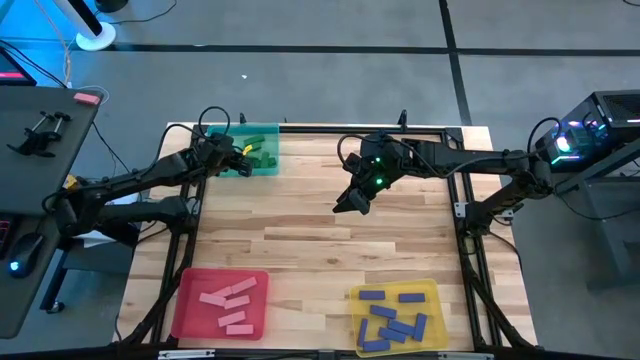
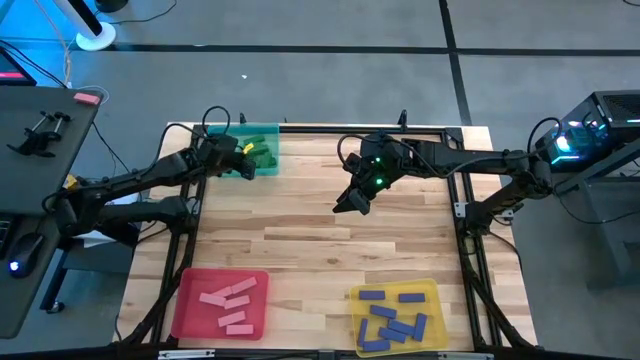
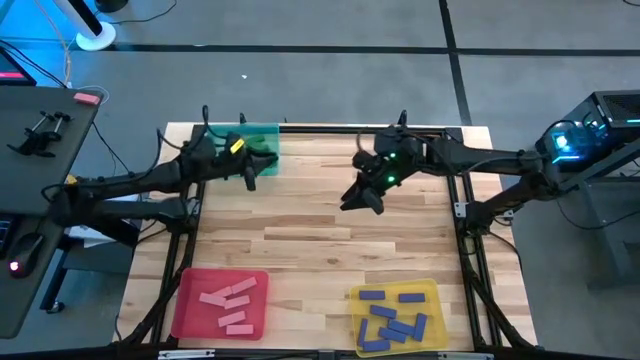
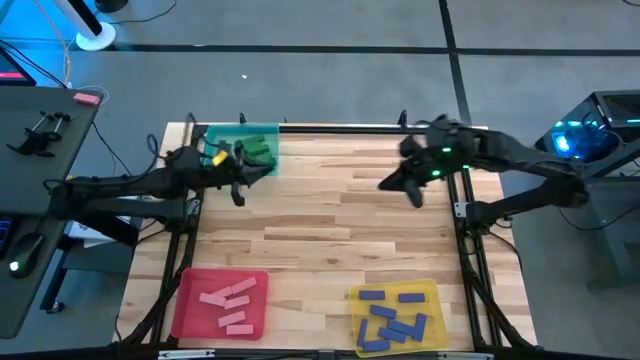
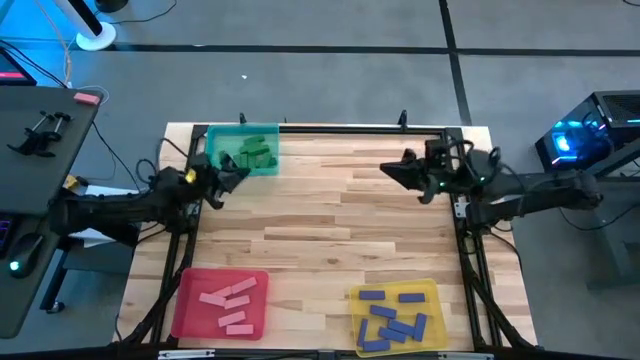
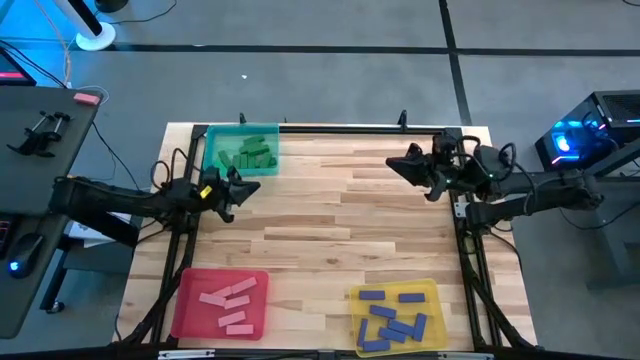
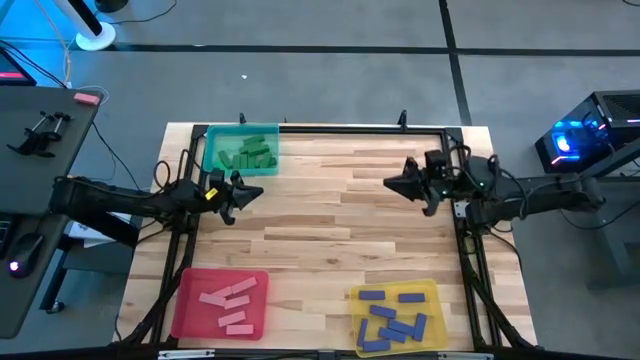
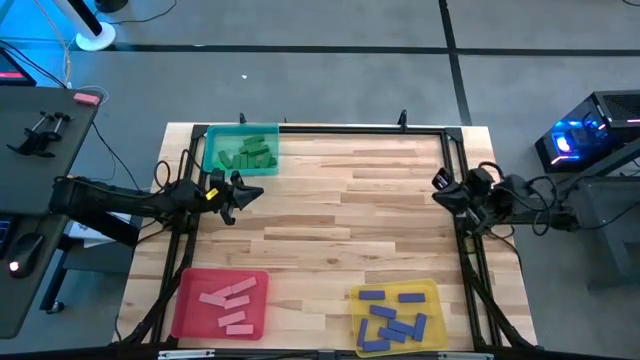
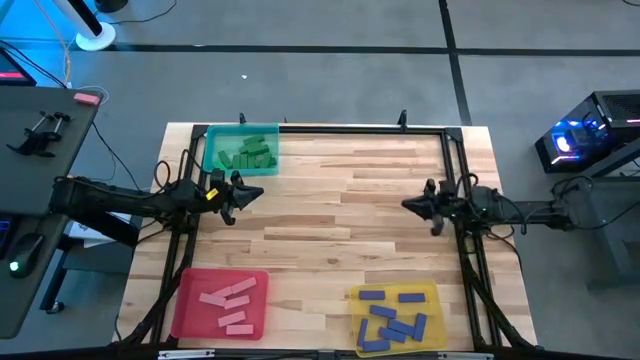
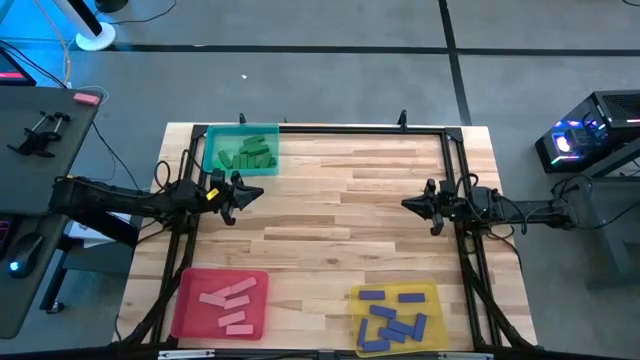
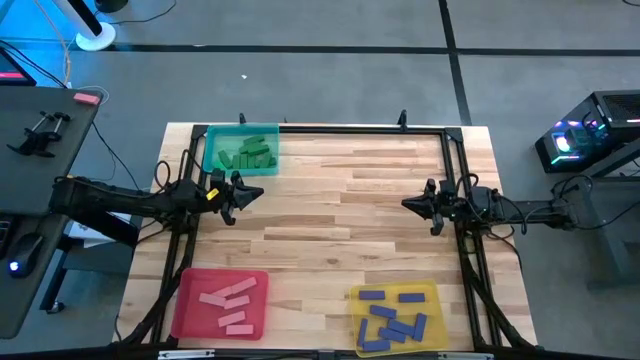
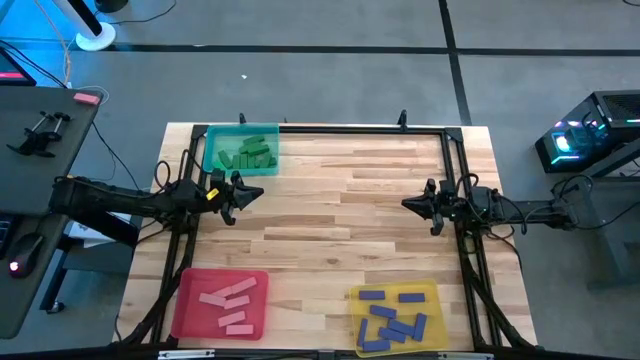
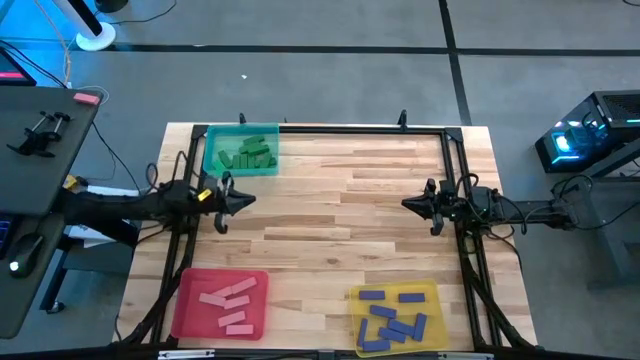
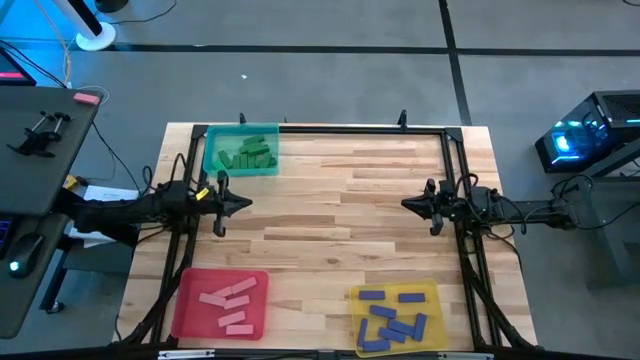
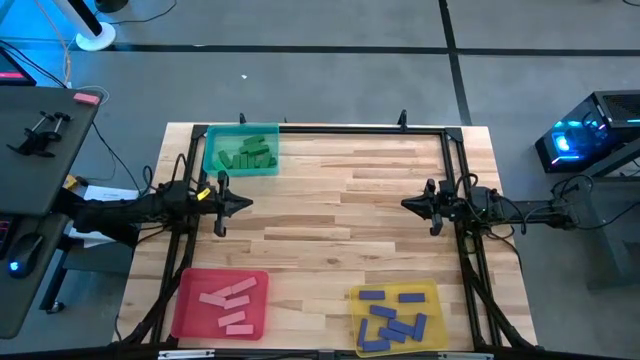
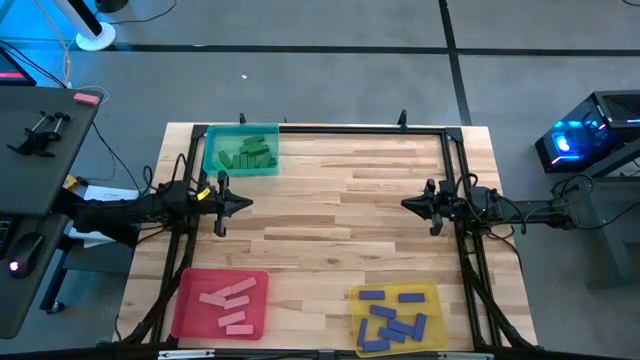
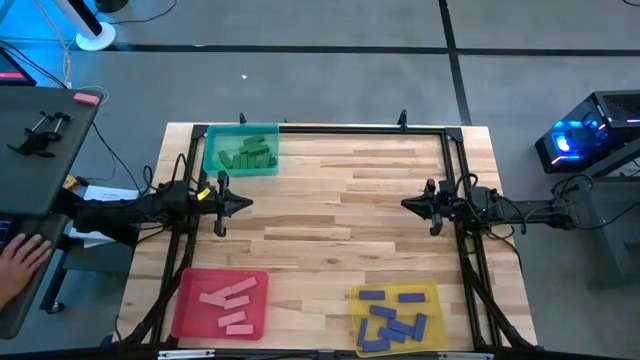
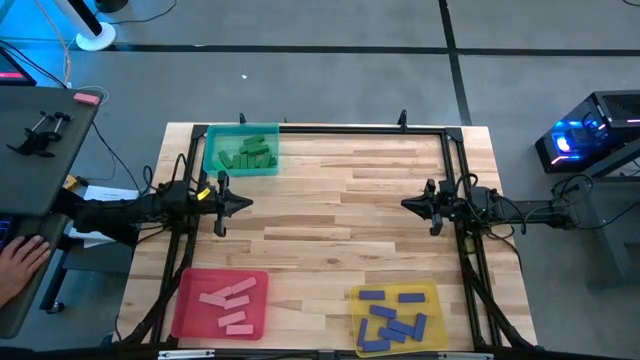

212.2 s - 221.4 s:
Task: Sort blocks
Return to Home Position

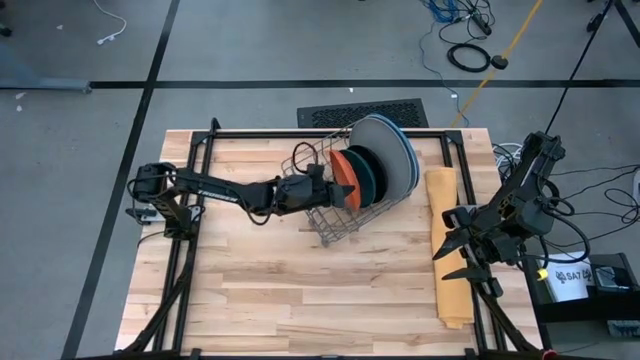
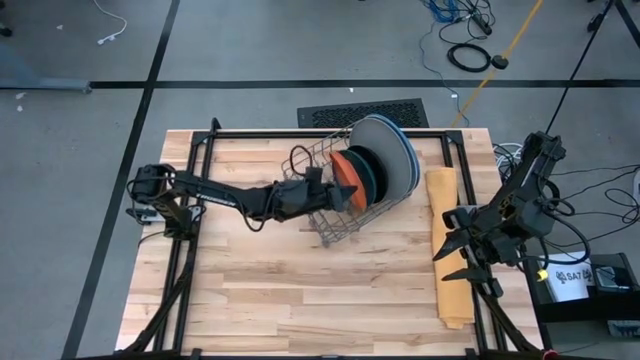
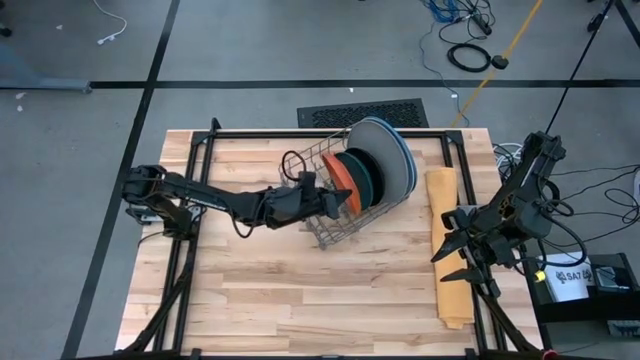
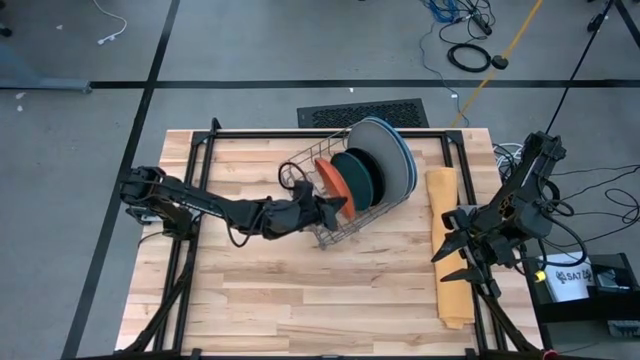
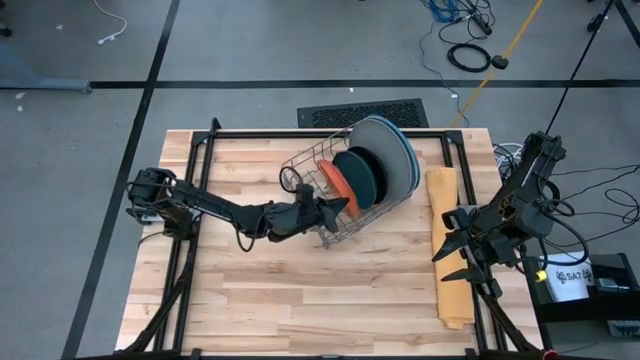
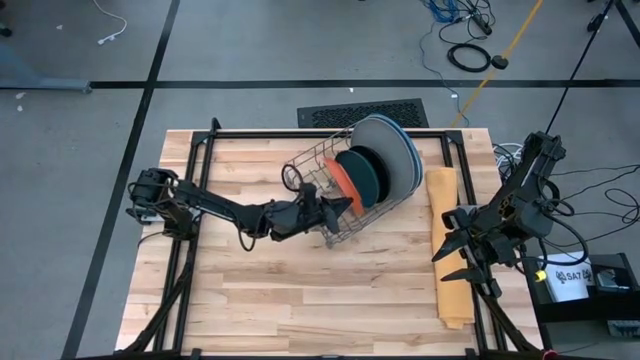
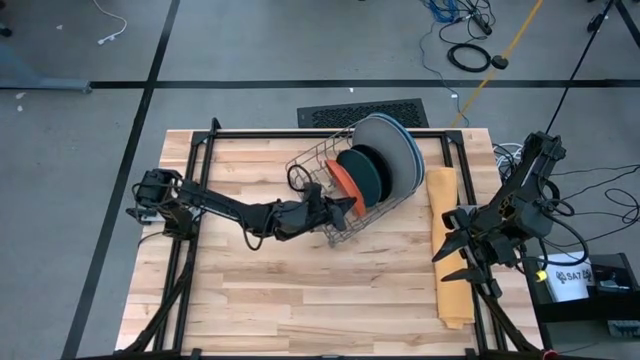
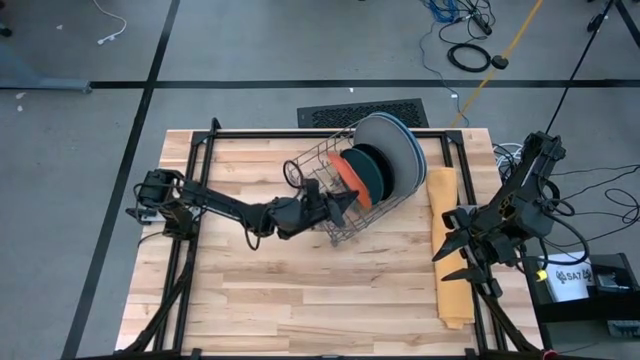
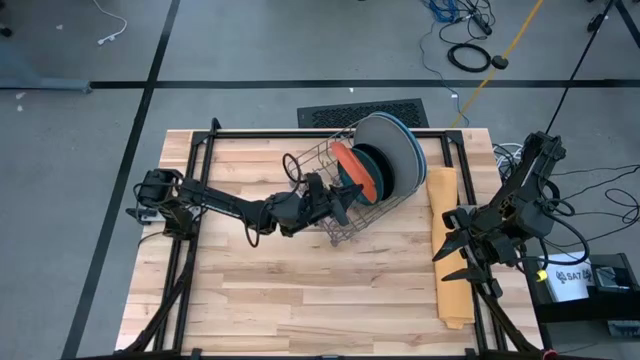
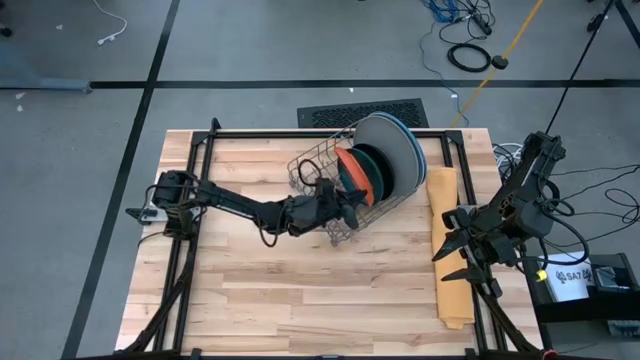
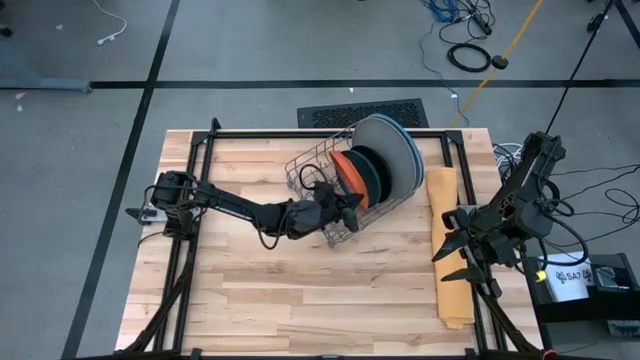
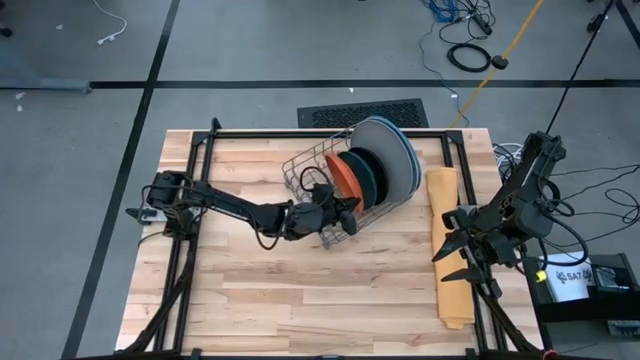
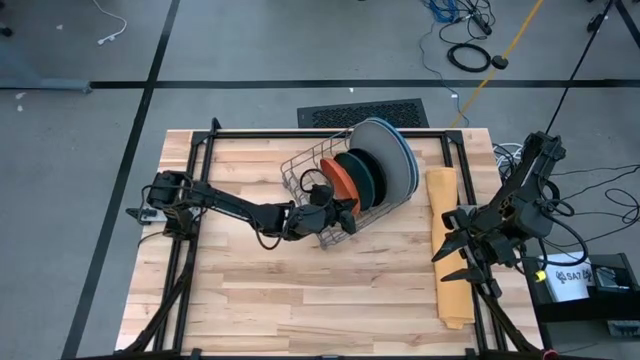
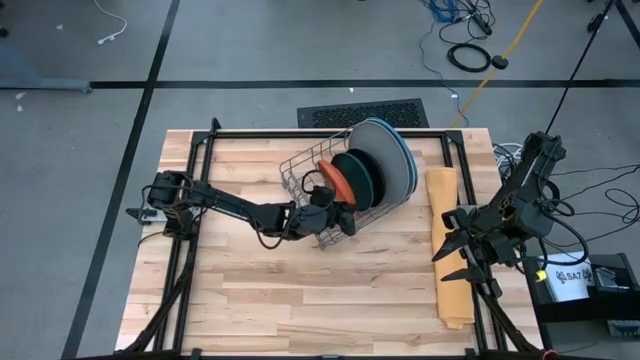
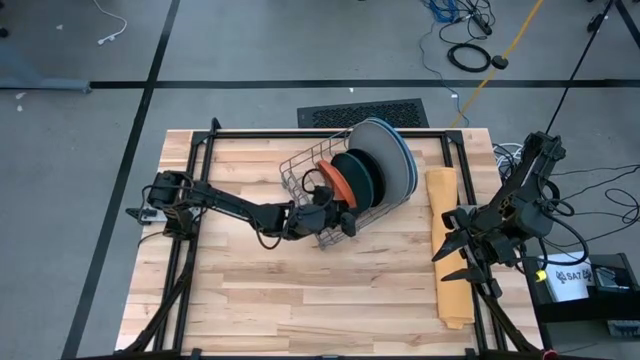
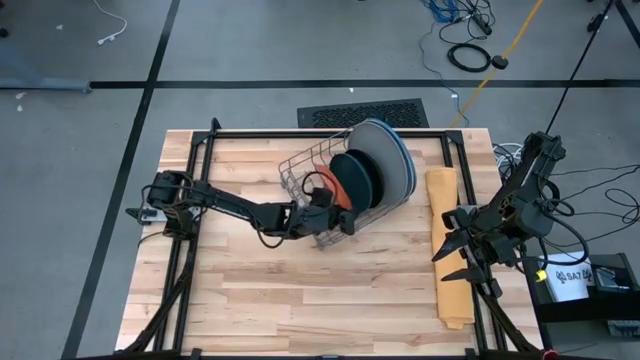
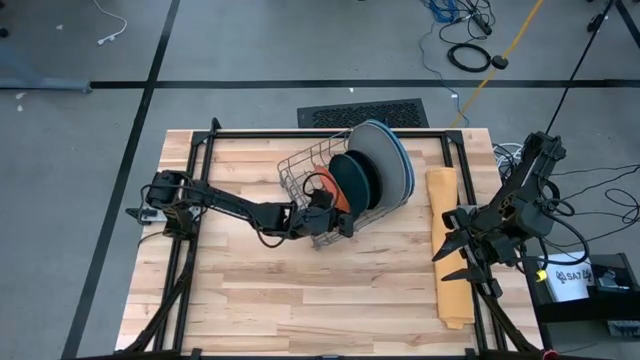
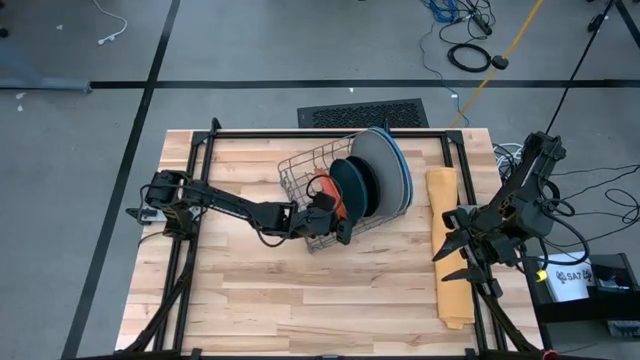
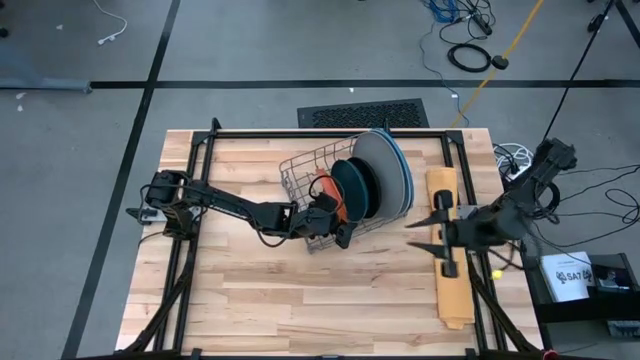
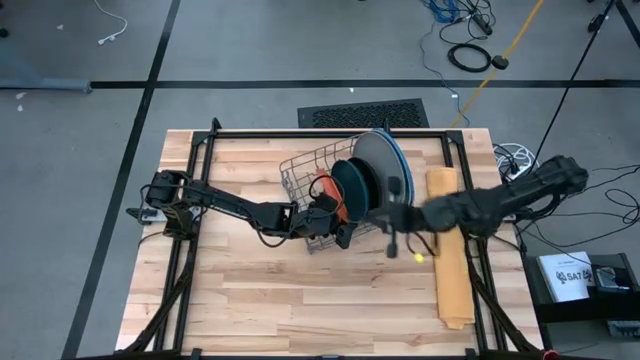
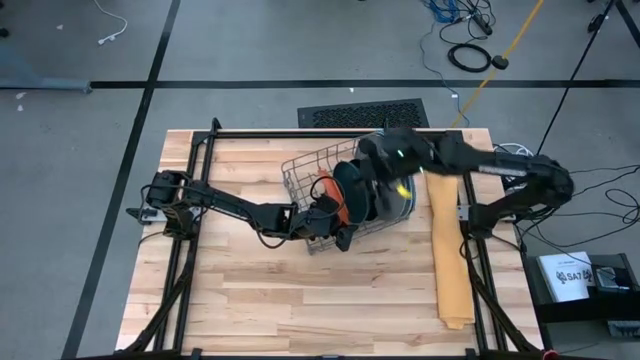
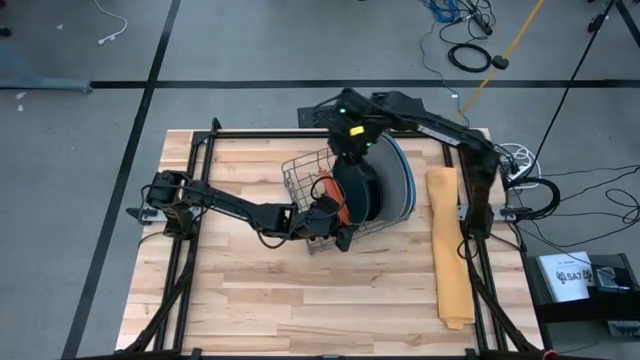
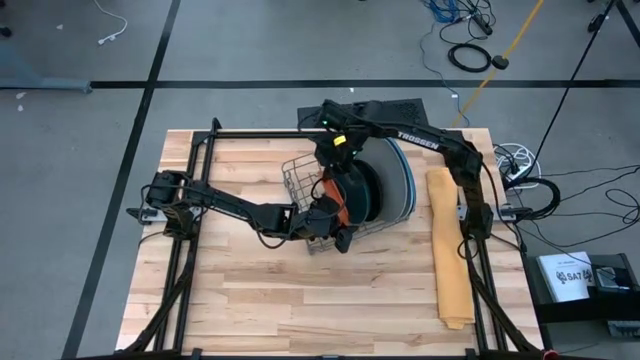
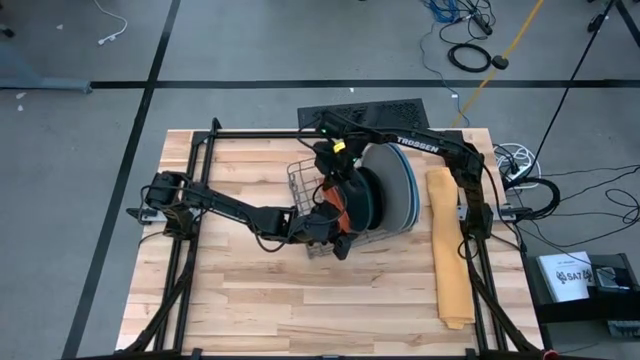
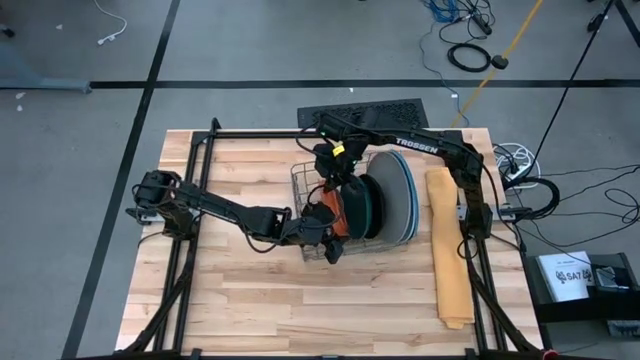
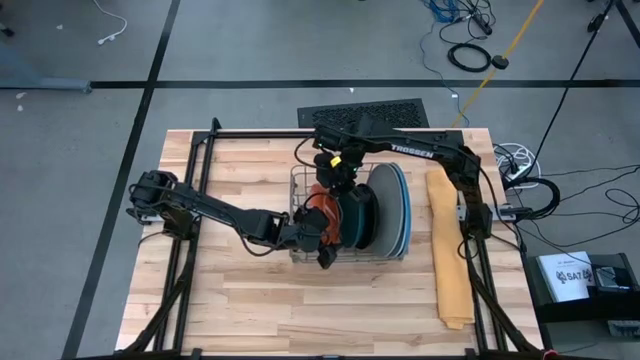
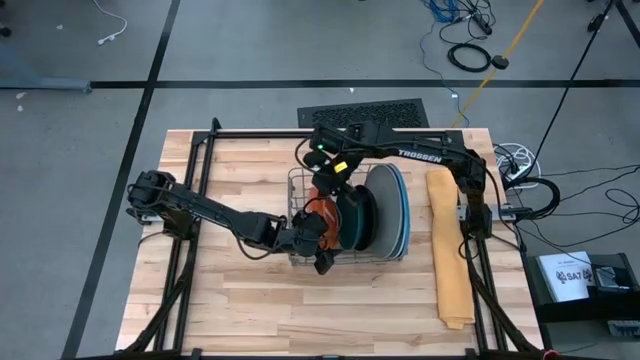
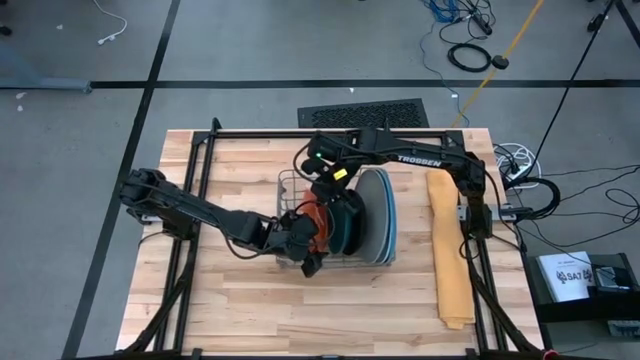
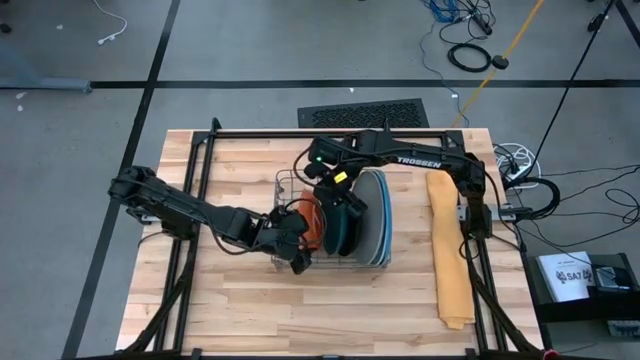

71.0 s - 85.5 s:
Task: Sort dishes
Put the orange plate into the dish rack
